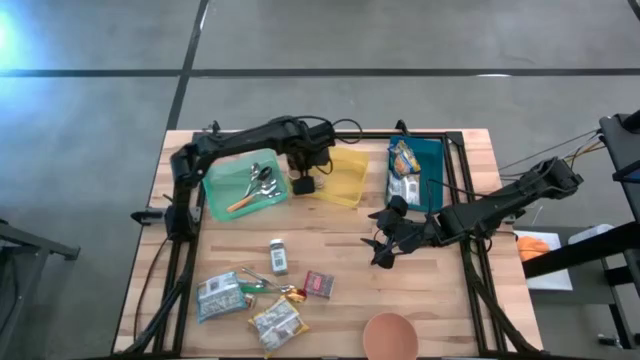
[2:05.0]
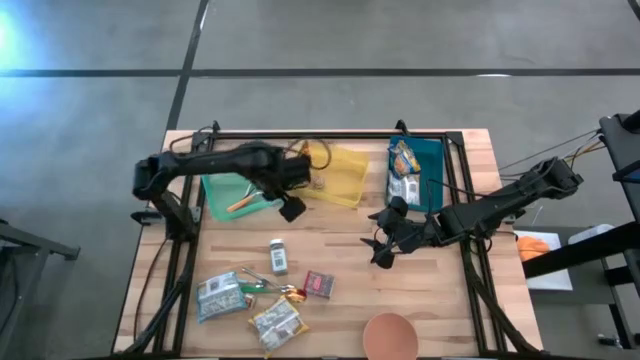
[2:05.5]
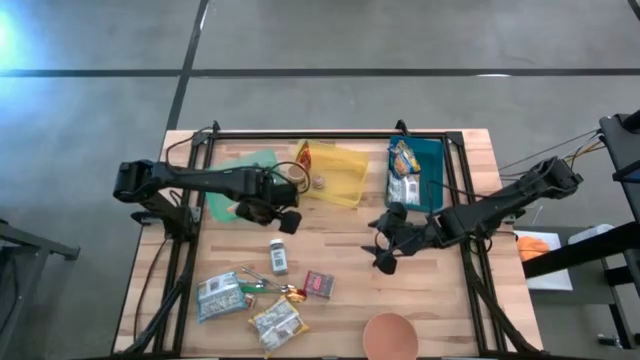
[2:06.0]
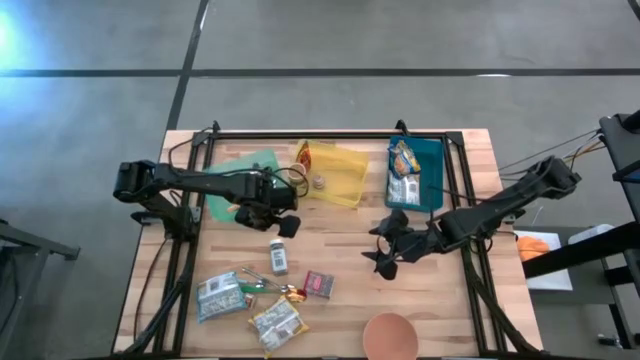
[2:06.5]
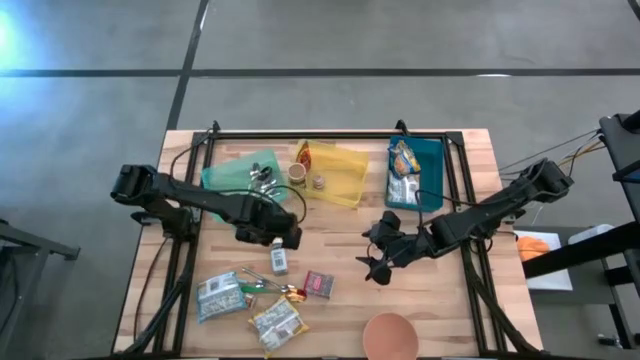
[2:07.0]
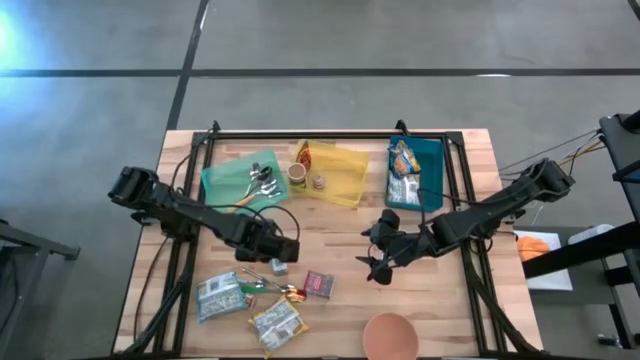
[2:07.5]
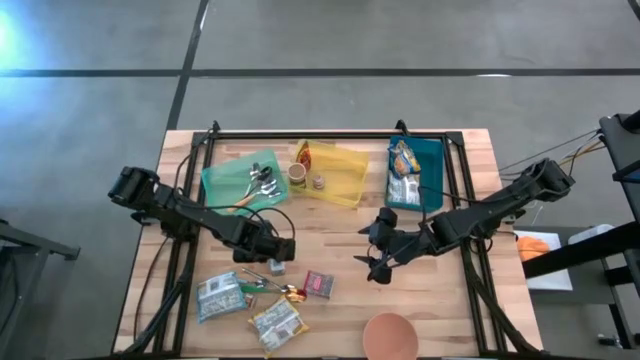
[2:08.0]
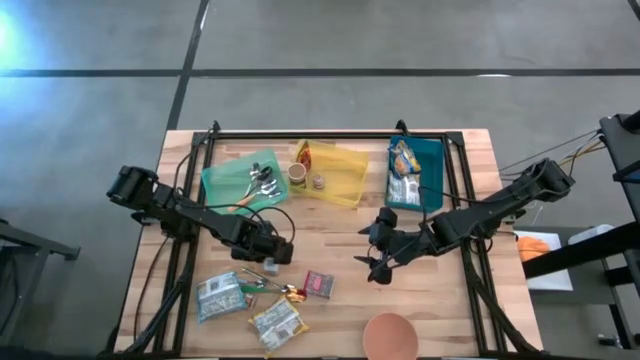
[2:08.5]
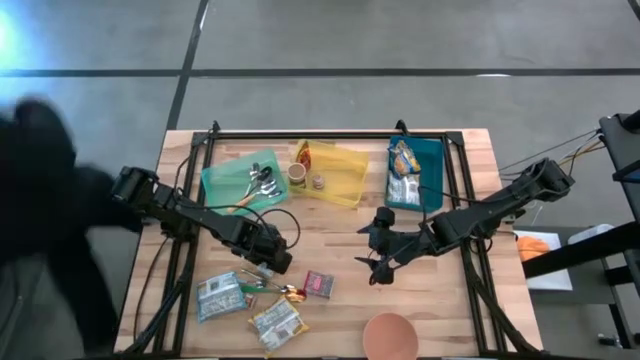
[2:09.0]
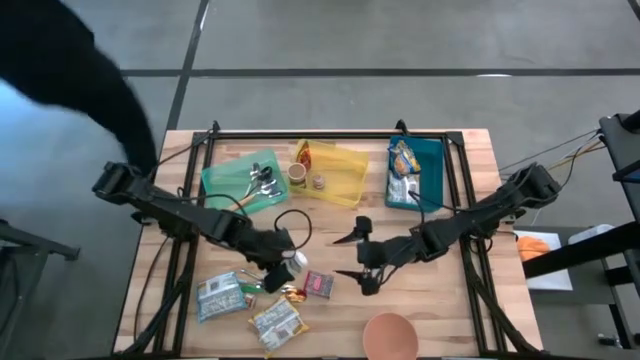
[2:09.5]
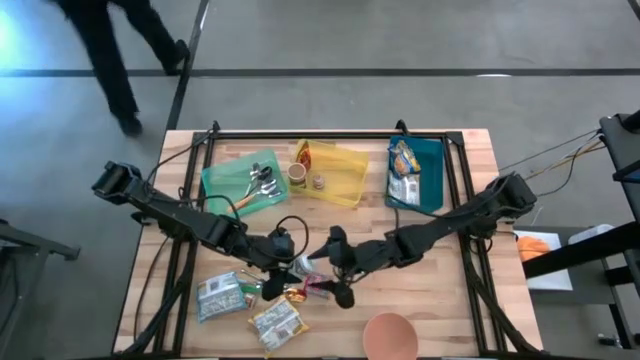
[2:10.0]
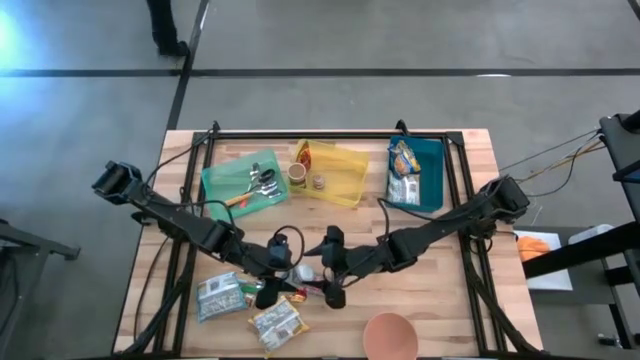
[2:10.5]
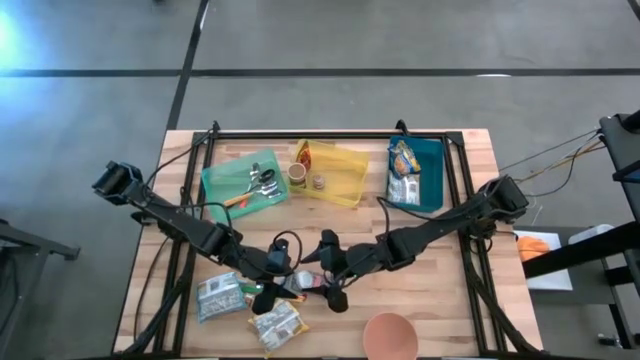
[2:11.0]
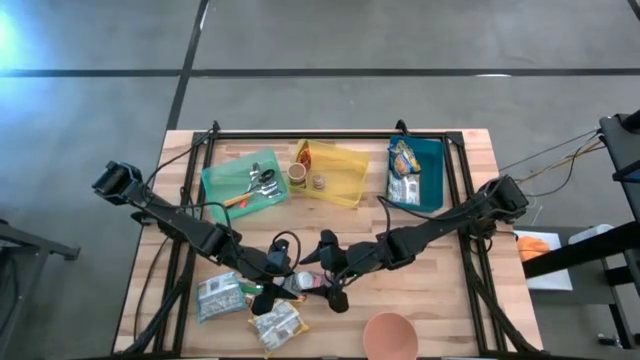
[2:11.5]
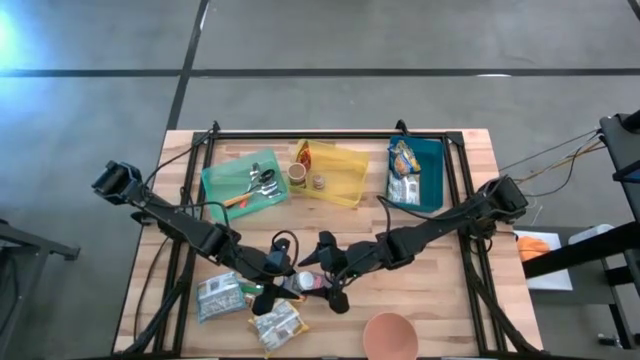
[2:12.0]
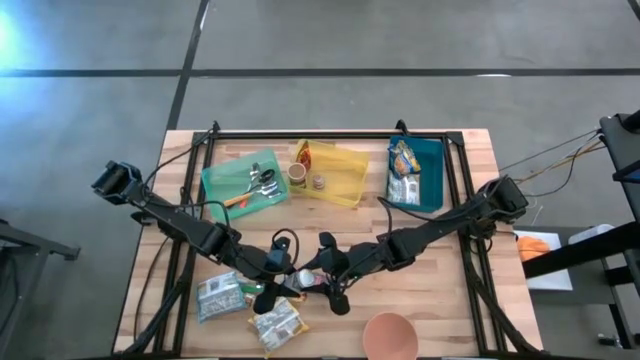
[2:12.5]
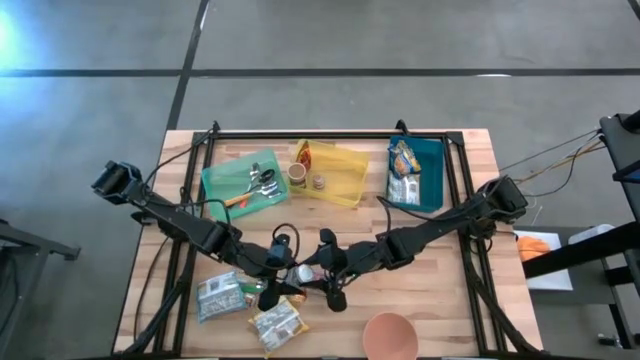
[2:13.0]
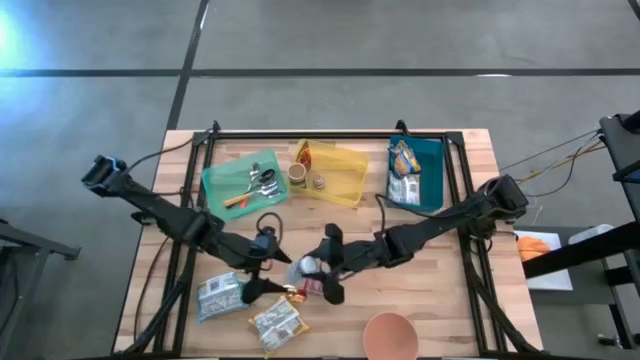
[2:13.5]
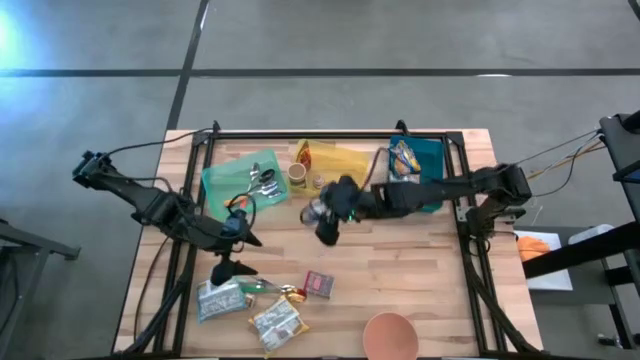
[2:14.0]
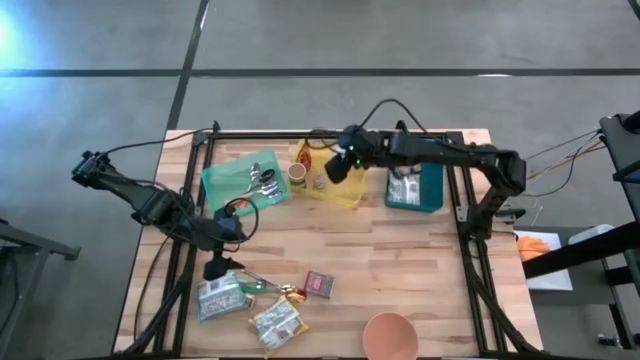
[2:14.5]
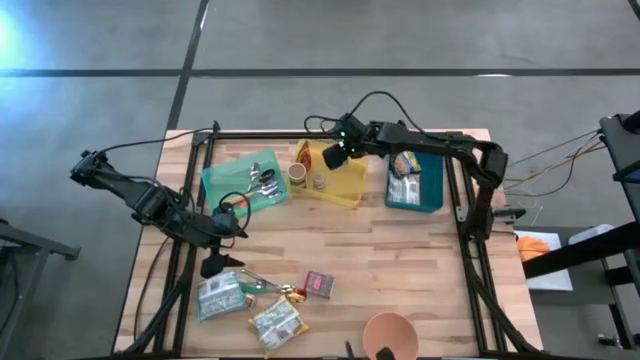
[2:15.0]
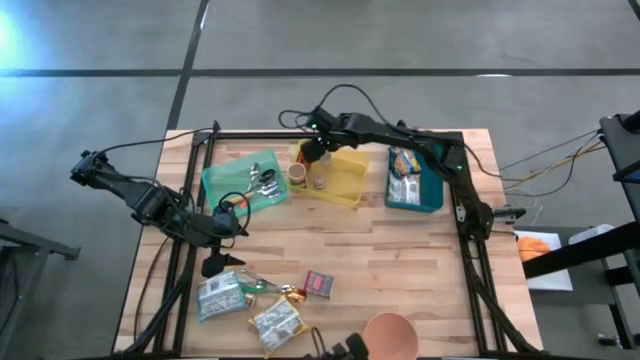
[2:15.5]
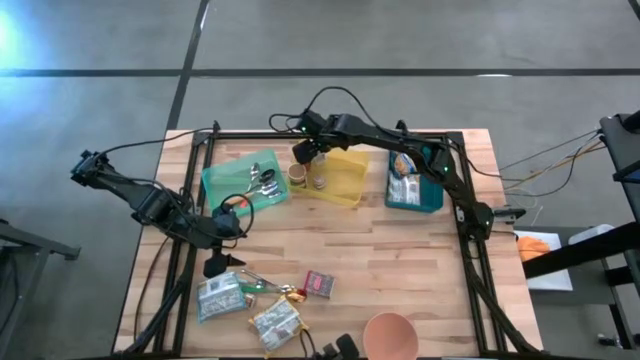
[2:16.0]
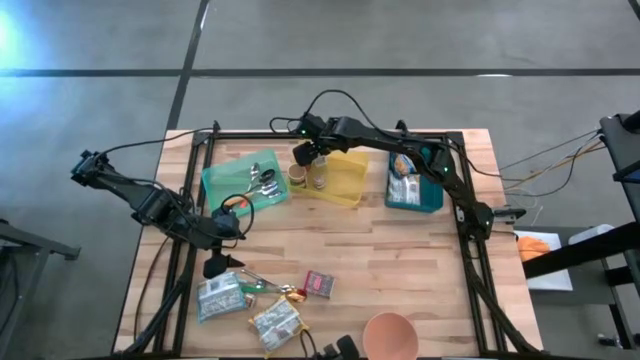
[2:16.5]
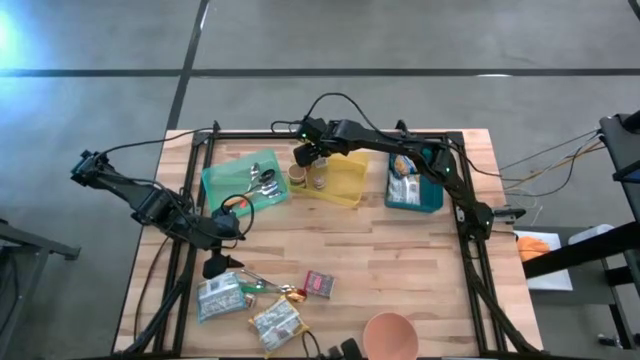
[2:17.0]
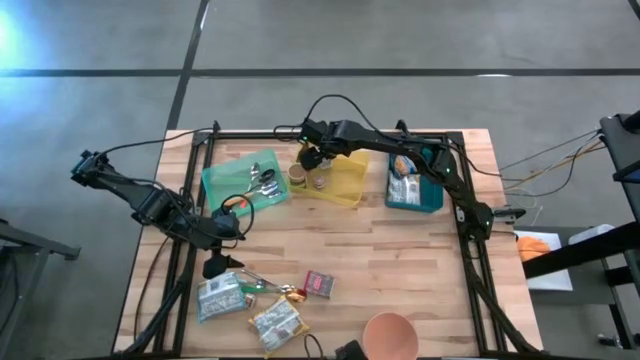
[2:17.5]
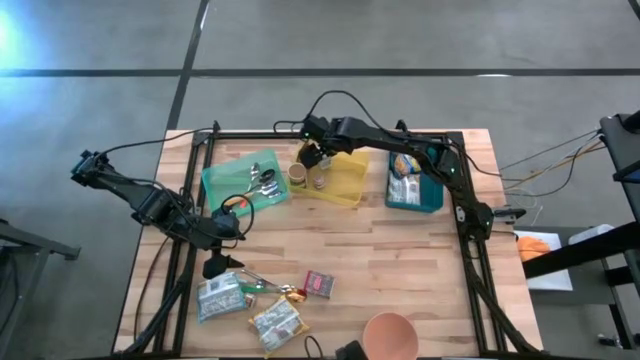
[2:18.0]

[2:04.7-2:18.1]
Put the white seasoning bottle into the yellow bin
